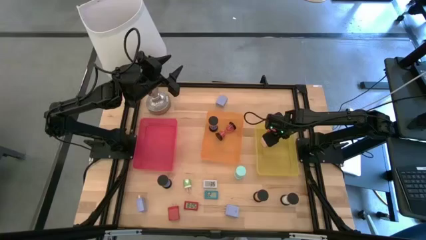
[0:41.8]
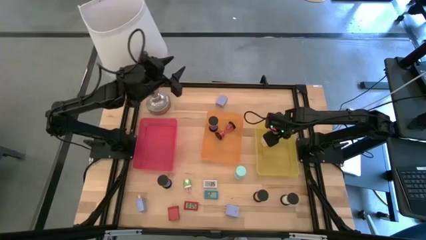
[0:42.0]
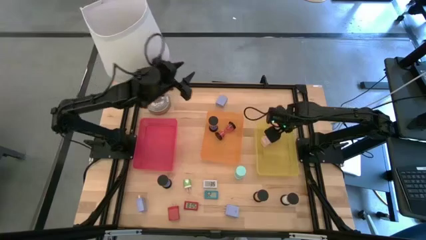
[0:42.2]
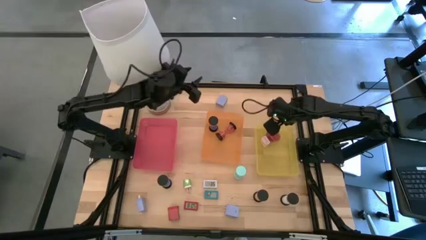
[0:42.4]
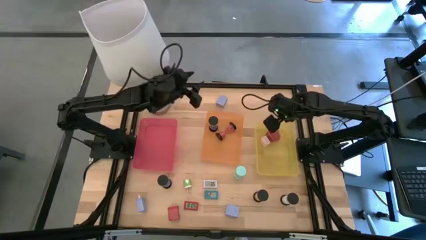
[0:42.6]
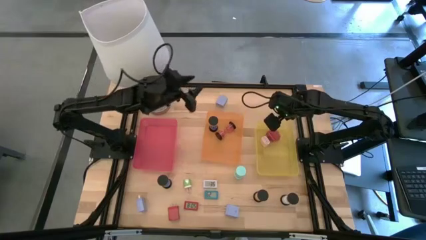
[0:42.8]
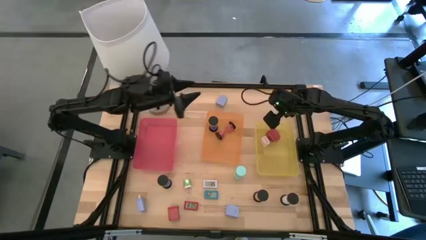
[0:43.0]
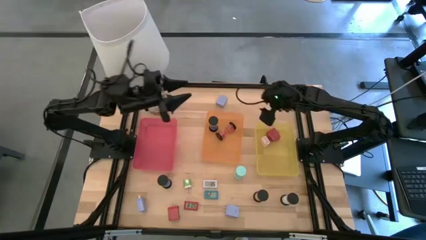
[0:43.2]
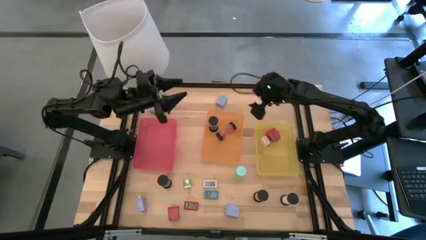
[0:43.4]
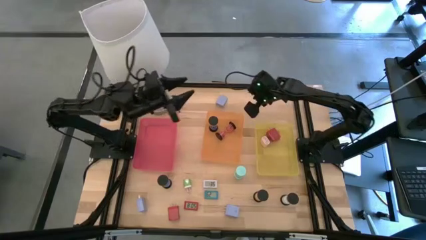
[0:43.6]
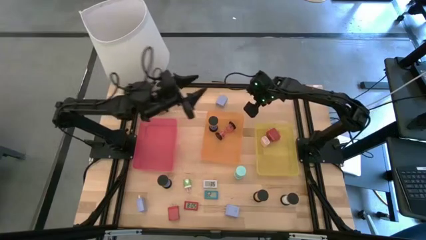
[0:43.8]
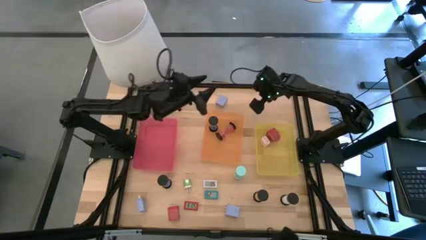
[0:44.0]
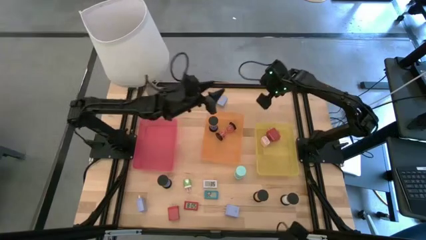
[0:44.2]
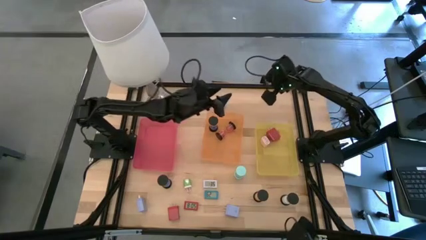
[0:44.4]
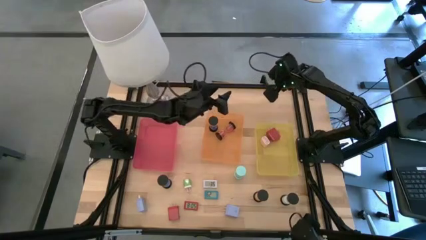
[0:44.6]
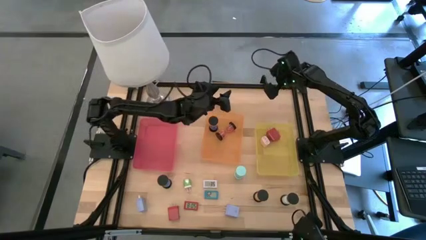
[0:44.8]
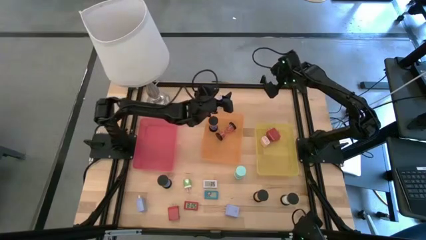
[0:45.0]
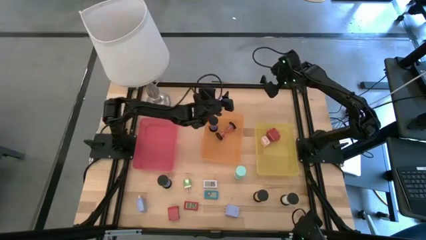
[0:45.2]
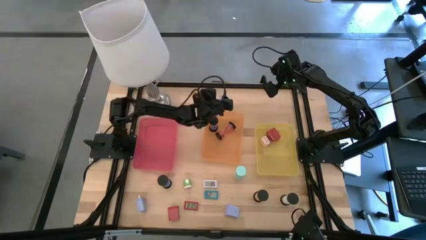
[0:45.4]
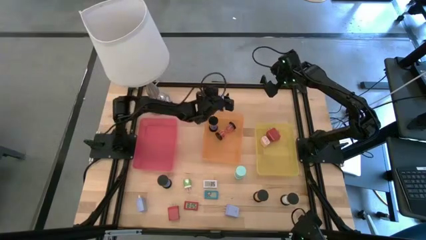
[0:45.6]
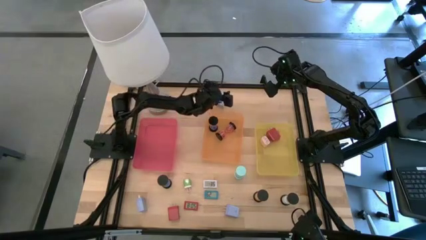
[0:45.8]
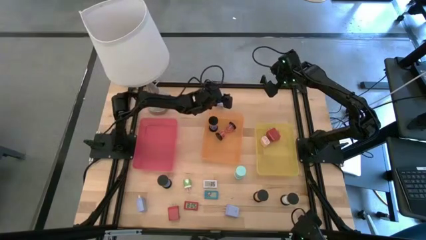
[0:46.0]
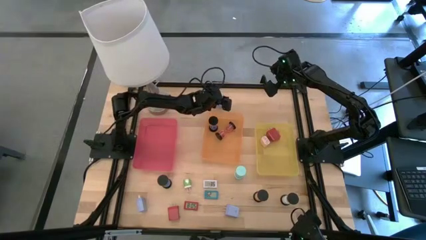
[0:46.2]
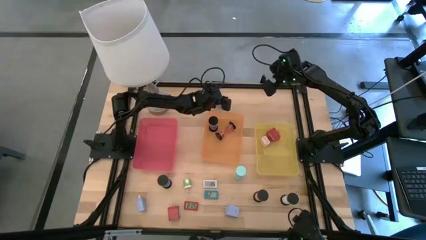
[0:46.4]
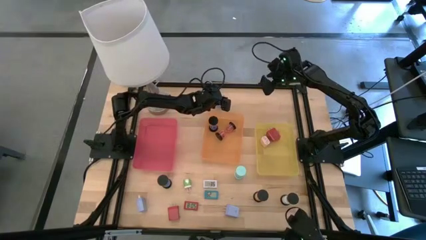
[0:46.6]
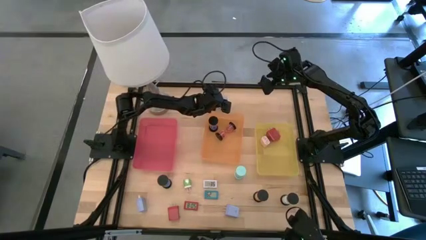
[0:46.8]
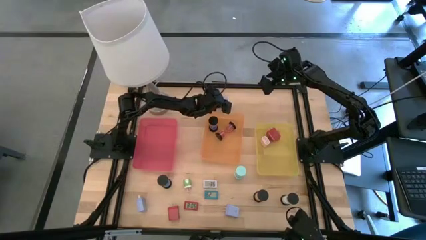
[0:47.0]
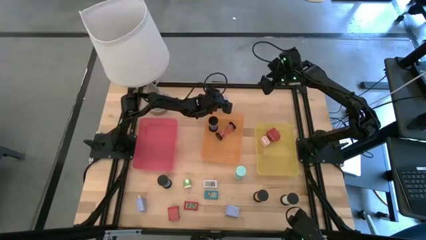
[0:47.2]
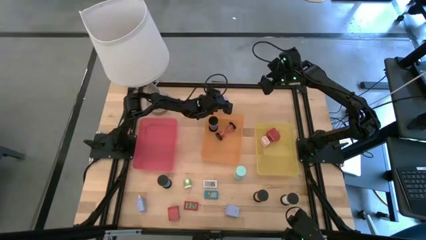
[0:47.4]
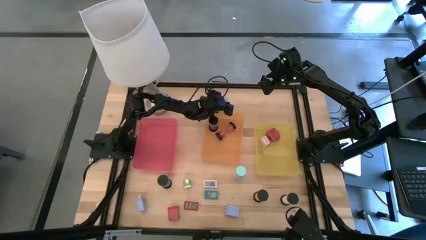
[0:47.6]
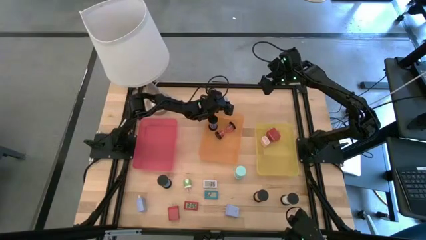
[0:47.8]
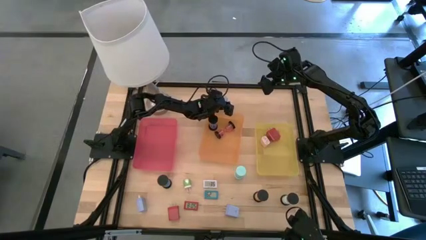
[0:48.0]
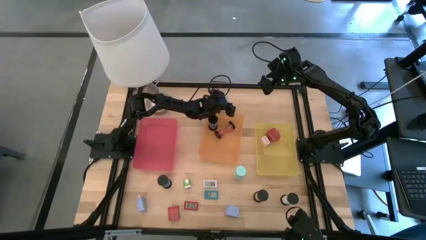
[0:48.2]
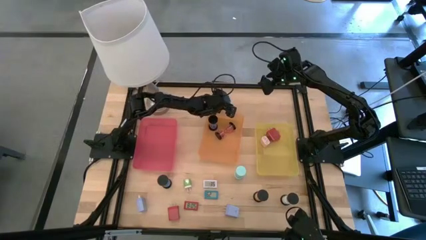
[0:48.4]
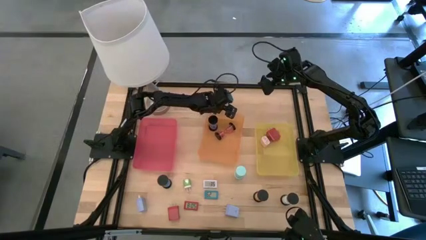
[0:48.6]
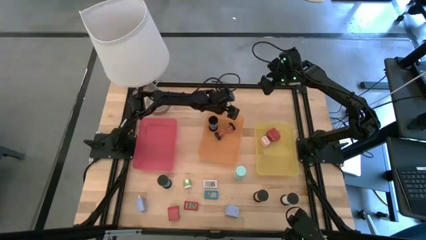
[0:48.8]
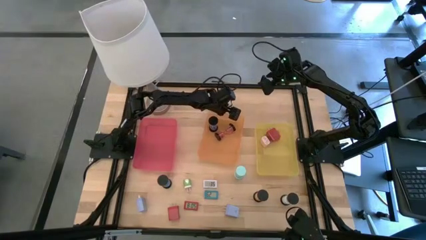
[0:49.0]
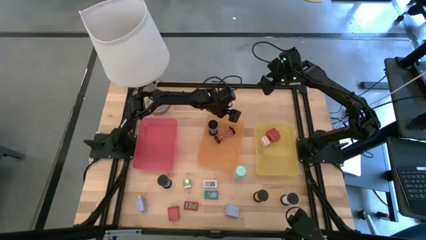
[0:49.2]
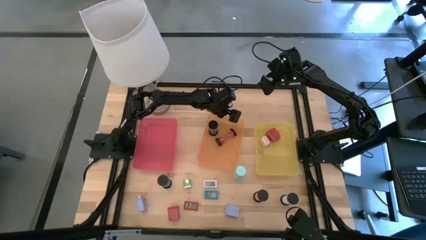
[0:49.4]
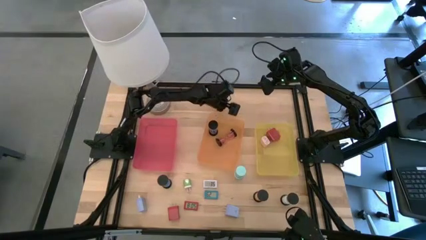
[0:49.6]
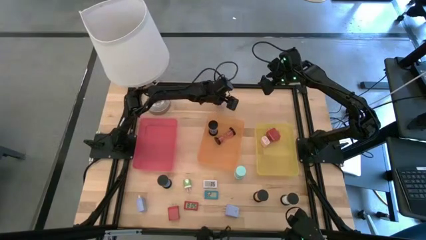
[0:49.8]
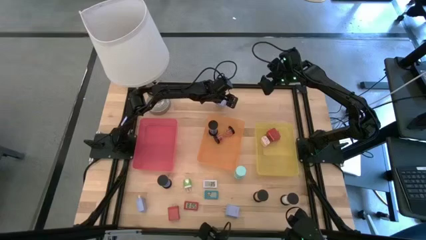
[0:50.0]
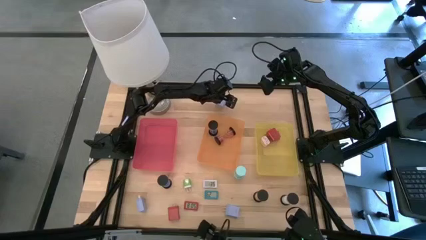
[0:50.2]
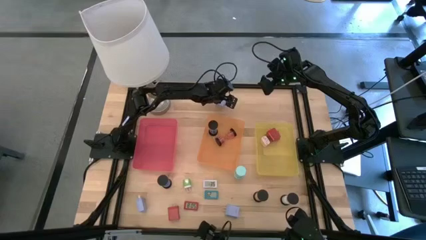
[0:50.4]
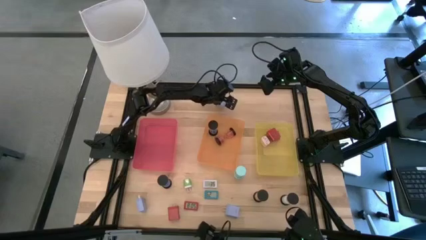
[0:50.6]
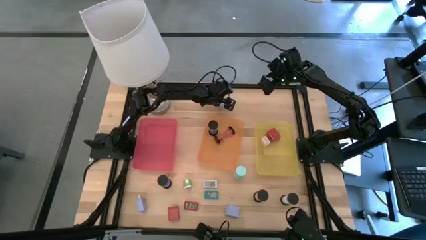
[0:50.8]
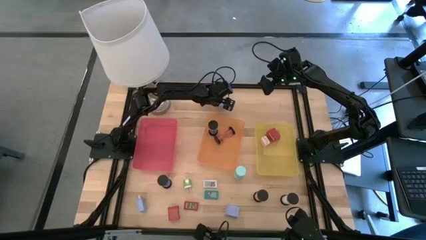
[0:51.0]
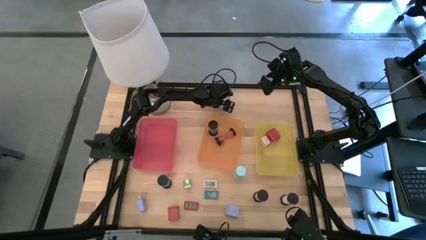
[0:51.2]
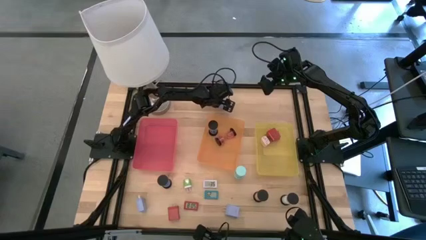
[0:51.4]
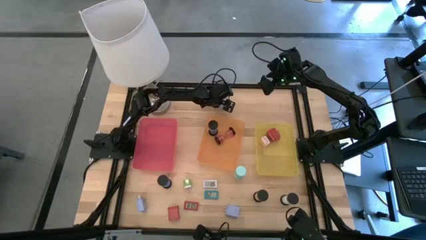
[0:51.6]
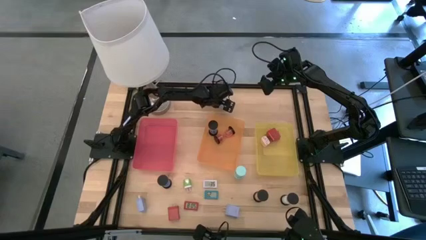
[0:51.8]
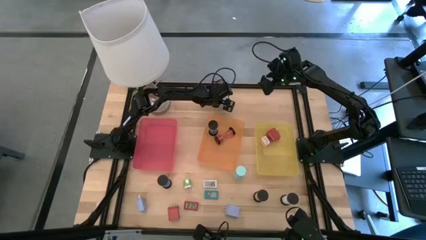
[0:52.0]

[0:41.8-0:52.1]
Task: Pick & Place Office items
Put the top light blue charger adapter into the yellow bin
